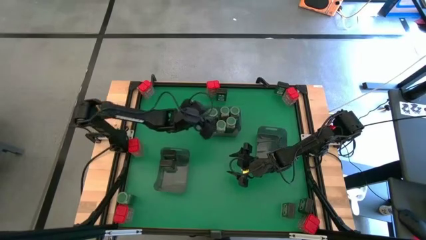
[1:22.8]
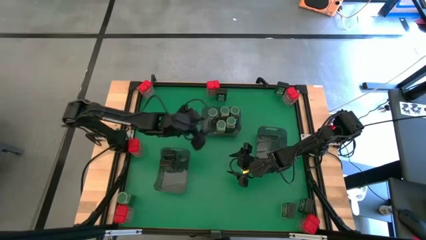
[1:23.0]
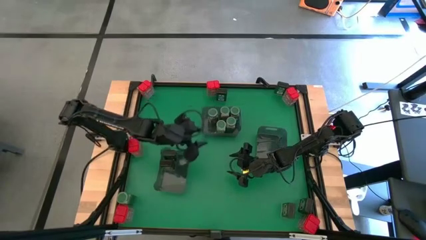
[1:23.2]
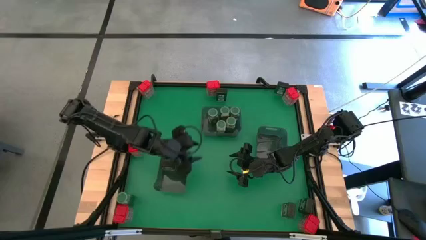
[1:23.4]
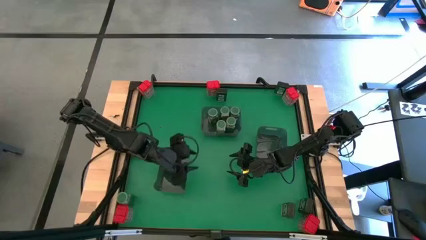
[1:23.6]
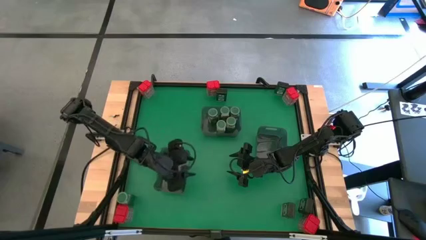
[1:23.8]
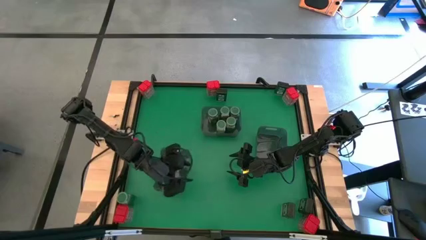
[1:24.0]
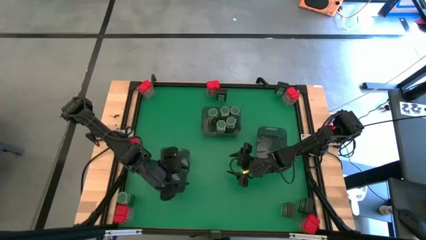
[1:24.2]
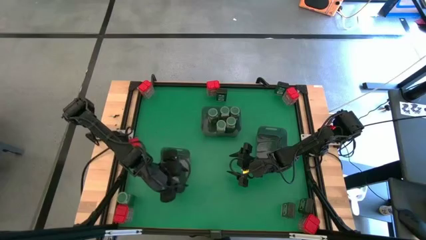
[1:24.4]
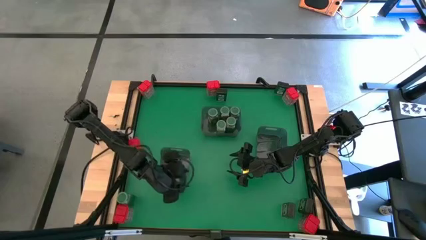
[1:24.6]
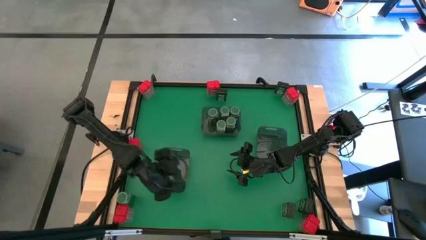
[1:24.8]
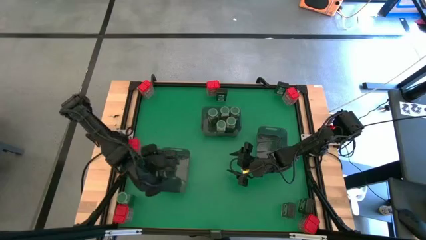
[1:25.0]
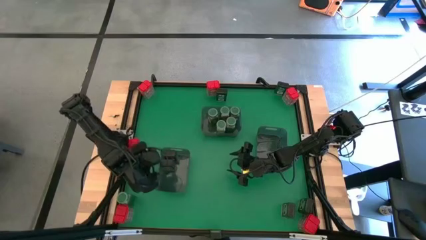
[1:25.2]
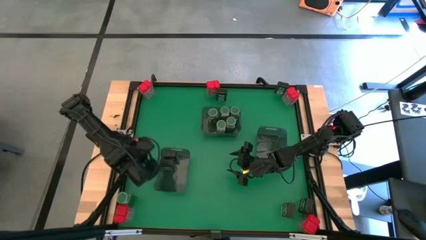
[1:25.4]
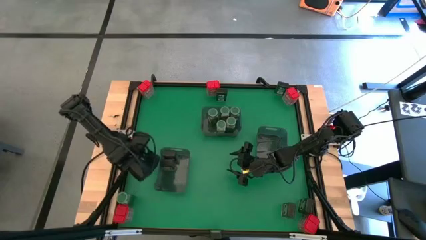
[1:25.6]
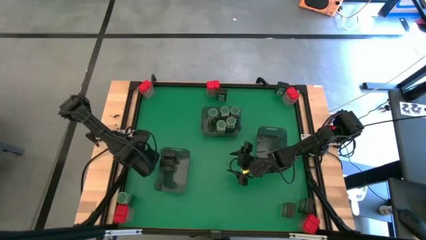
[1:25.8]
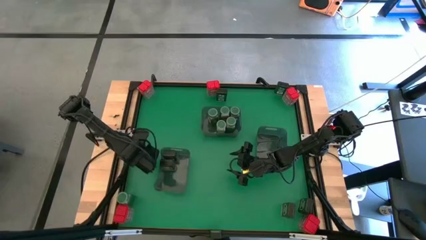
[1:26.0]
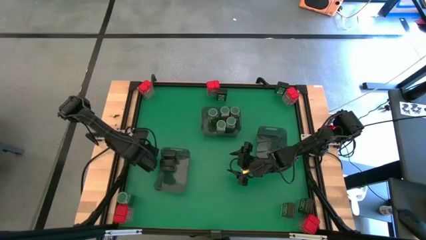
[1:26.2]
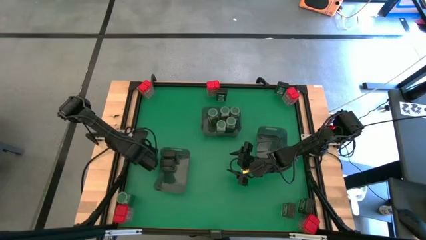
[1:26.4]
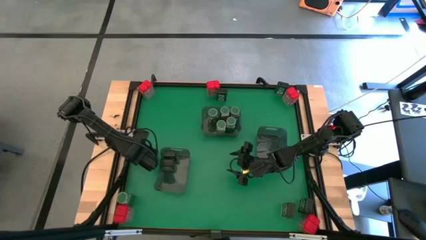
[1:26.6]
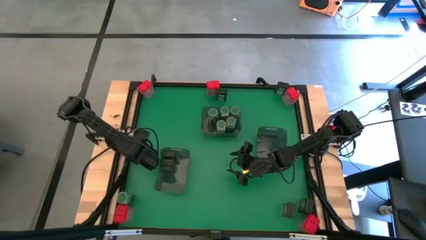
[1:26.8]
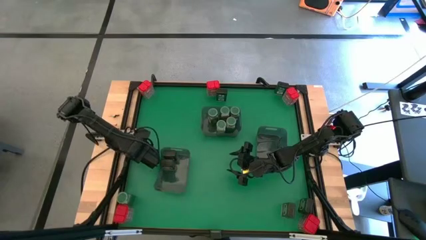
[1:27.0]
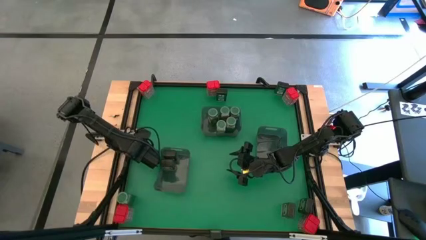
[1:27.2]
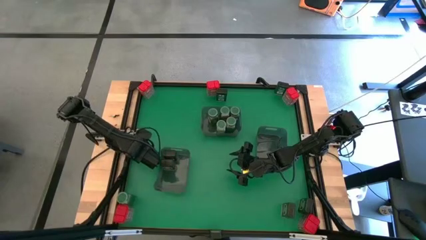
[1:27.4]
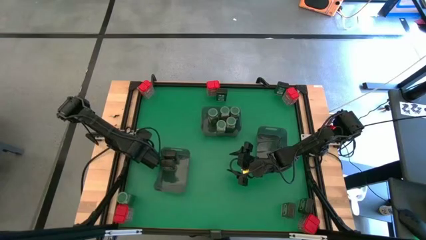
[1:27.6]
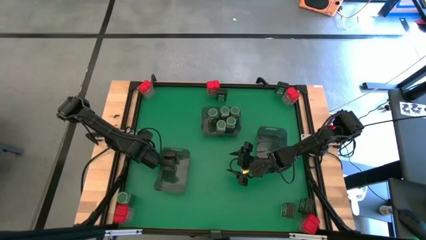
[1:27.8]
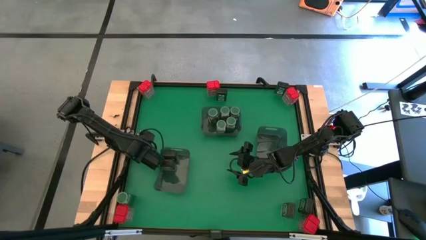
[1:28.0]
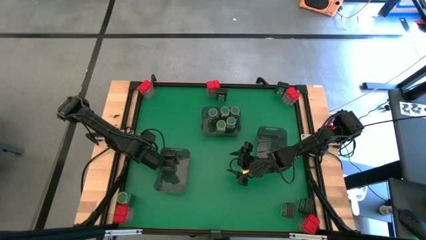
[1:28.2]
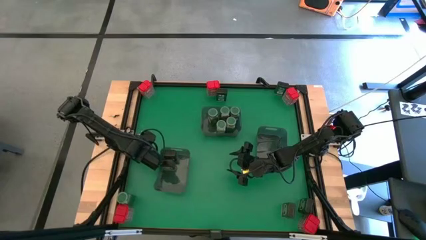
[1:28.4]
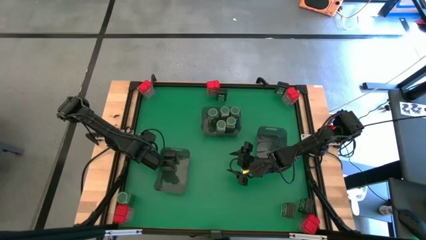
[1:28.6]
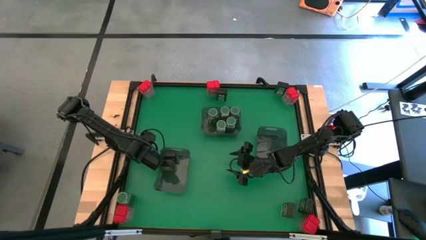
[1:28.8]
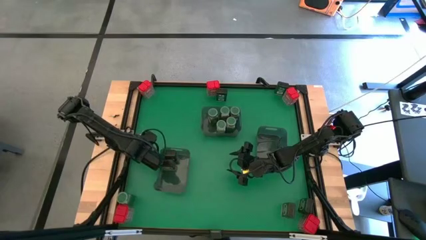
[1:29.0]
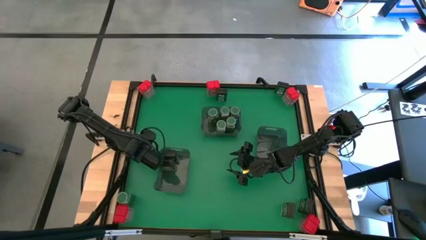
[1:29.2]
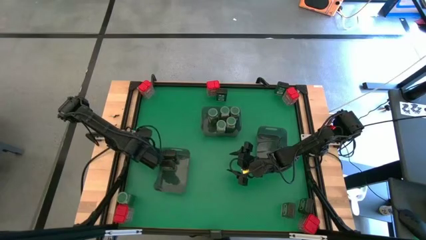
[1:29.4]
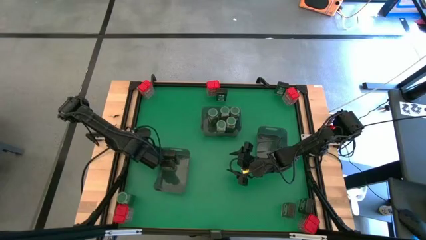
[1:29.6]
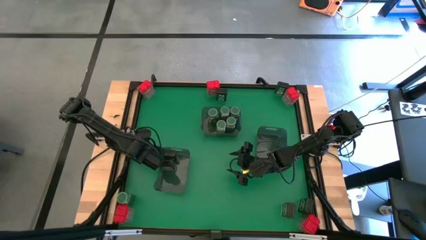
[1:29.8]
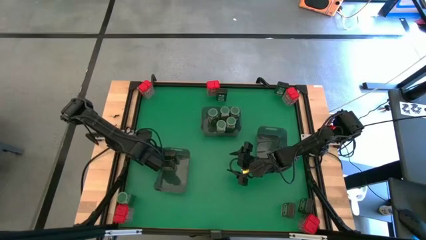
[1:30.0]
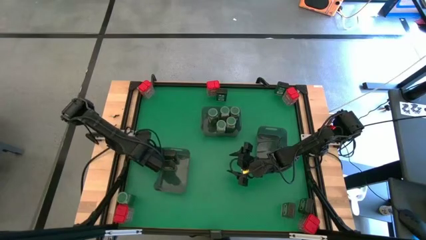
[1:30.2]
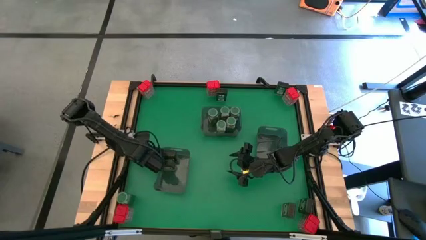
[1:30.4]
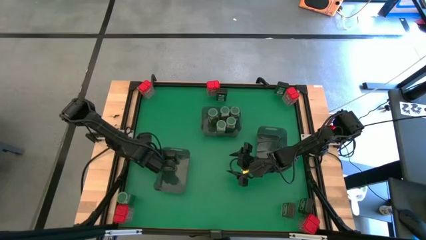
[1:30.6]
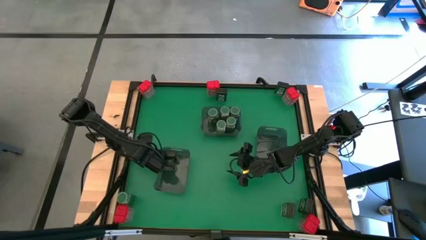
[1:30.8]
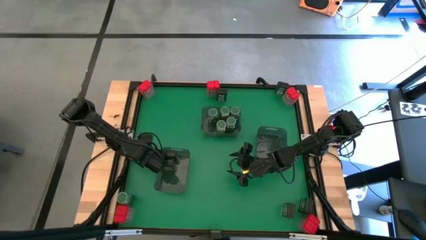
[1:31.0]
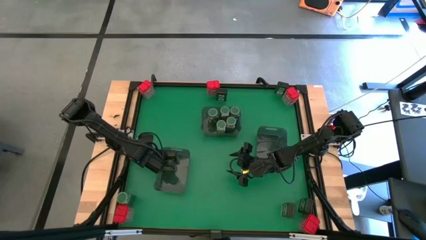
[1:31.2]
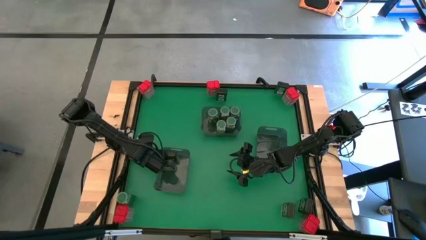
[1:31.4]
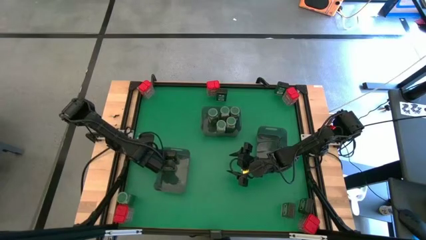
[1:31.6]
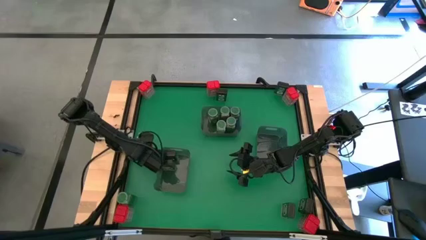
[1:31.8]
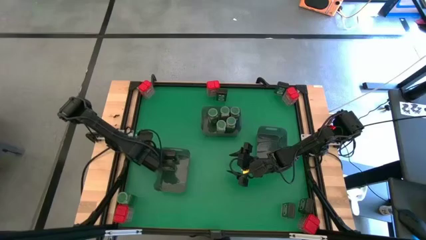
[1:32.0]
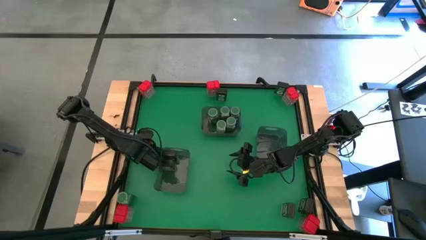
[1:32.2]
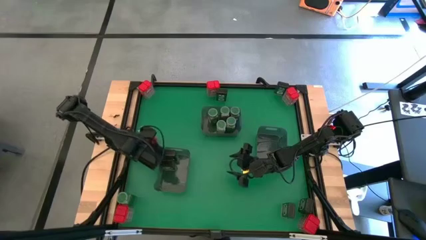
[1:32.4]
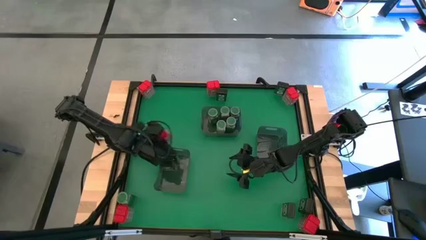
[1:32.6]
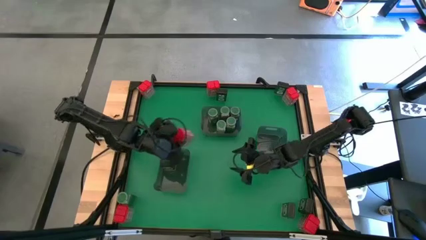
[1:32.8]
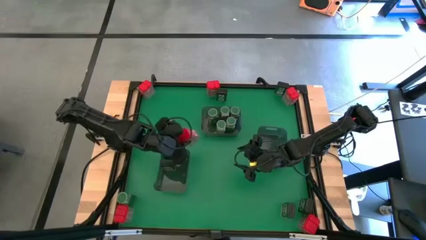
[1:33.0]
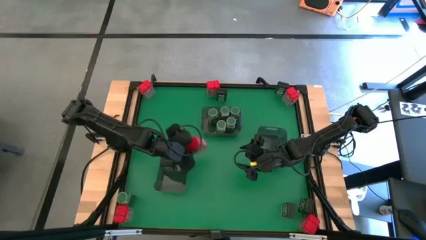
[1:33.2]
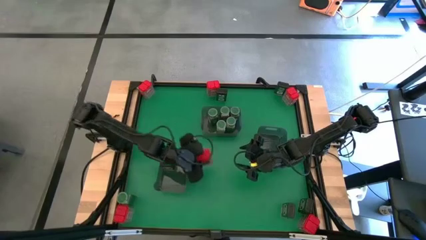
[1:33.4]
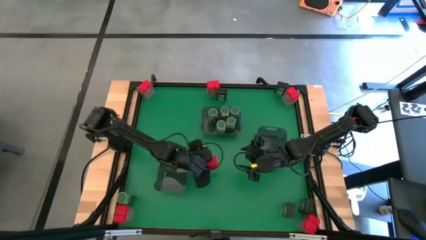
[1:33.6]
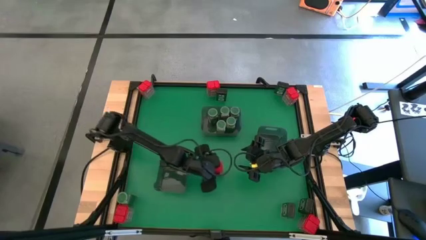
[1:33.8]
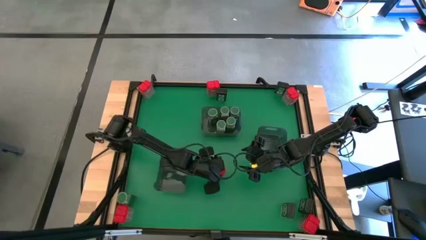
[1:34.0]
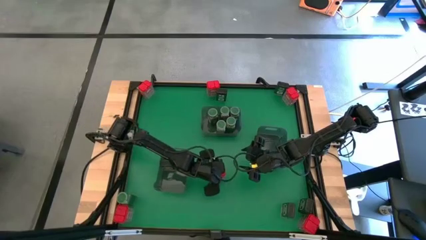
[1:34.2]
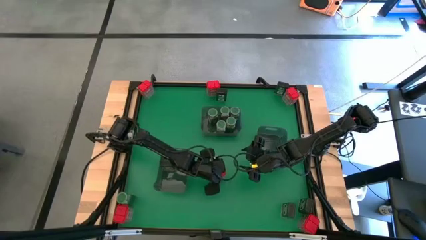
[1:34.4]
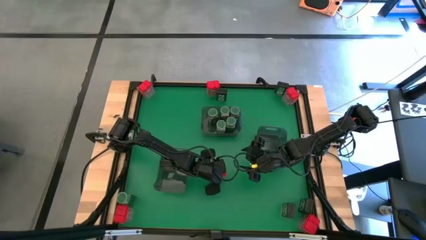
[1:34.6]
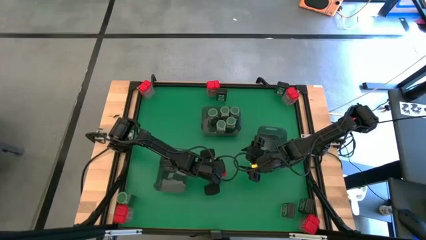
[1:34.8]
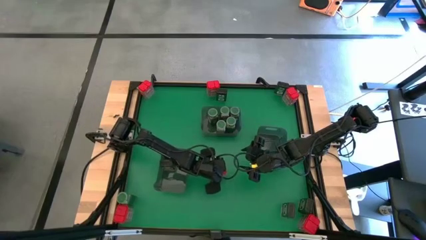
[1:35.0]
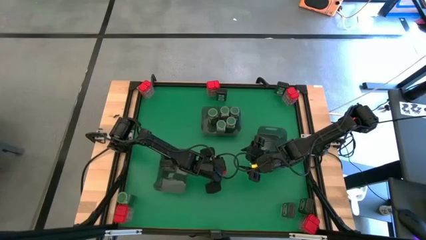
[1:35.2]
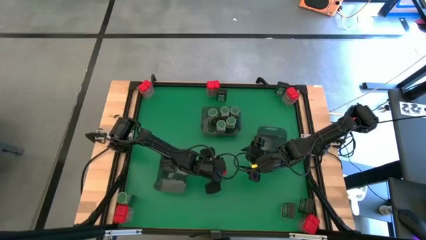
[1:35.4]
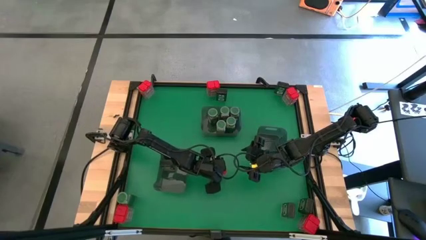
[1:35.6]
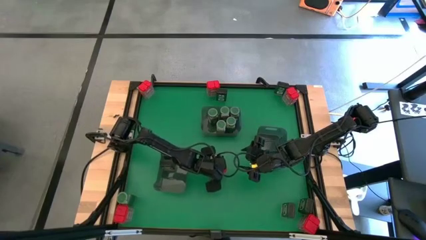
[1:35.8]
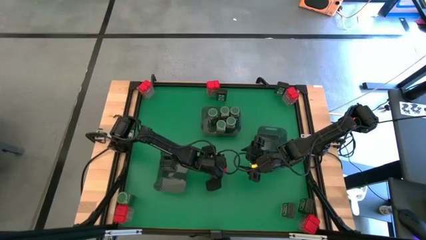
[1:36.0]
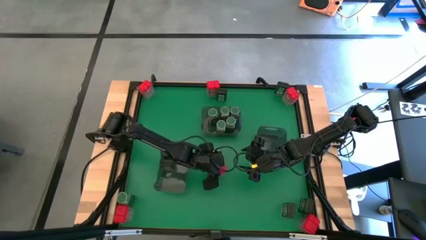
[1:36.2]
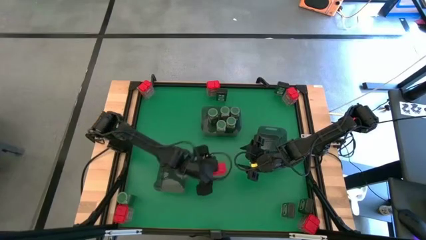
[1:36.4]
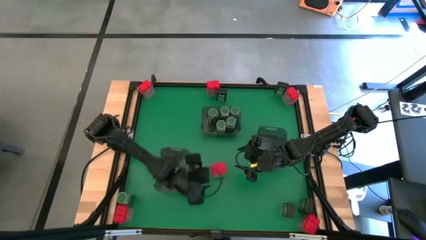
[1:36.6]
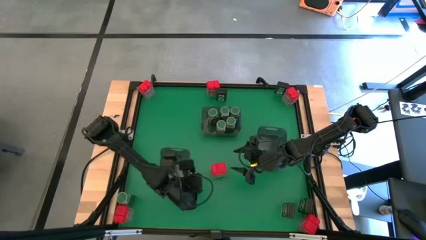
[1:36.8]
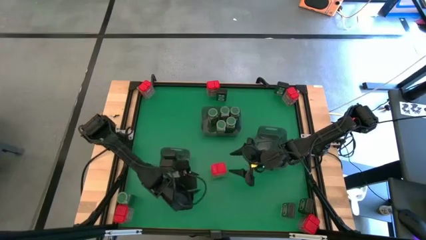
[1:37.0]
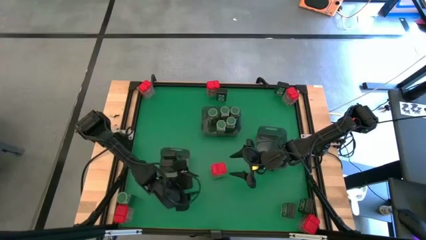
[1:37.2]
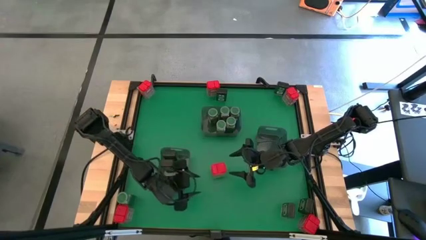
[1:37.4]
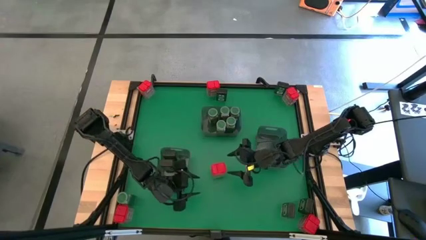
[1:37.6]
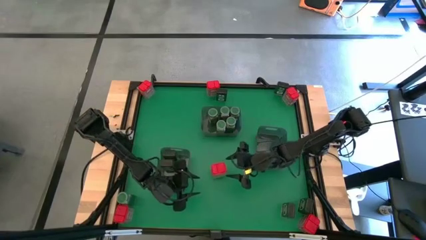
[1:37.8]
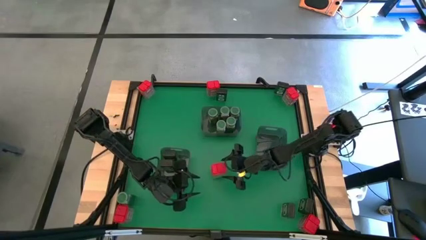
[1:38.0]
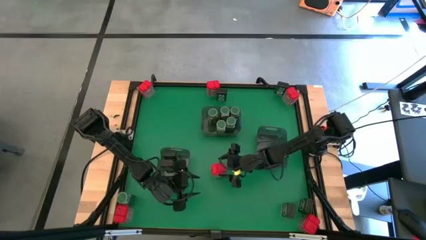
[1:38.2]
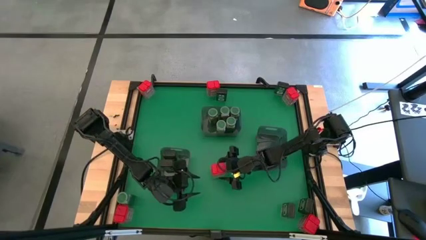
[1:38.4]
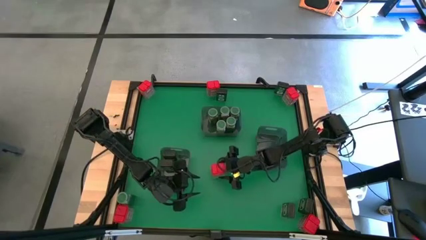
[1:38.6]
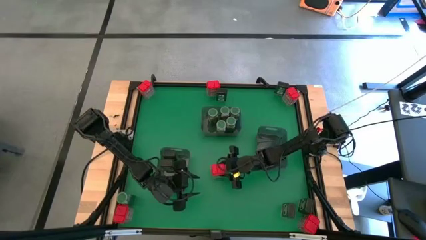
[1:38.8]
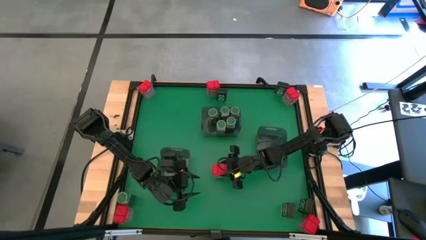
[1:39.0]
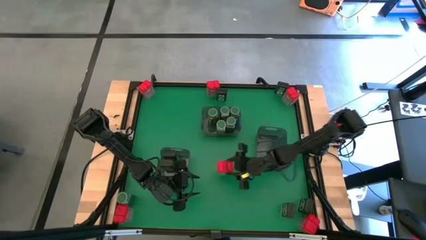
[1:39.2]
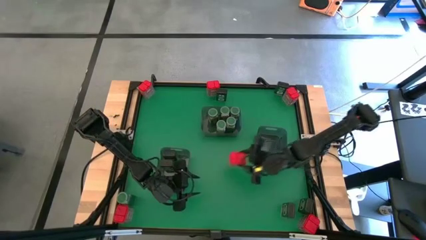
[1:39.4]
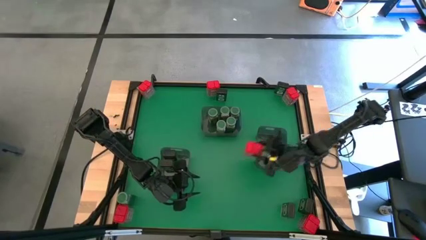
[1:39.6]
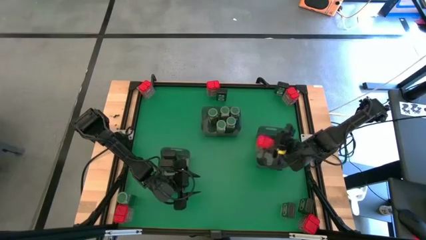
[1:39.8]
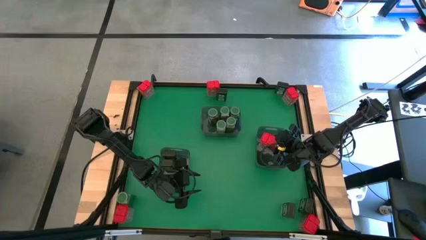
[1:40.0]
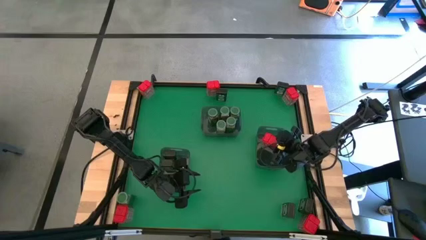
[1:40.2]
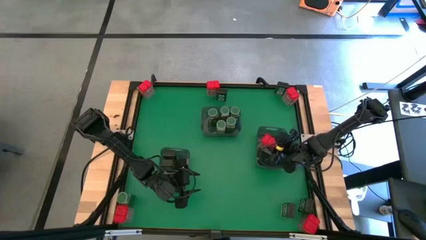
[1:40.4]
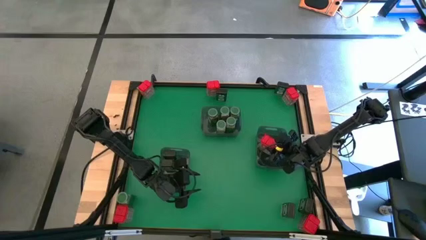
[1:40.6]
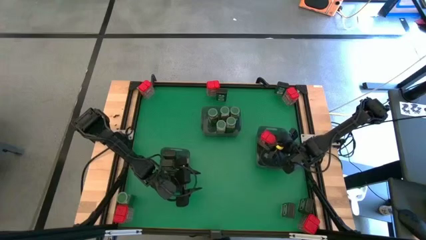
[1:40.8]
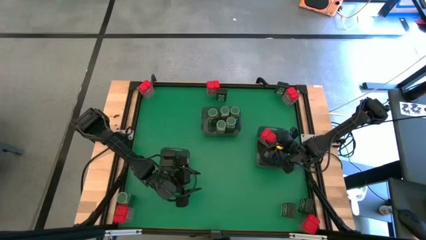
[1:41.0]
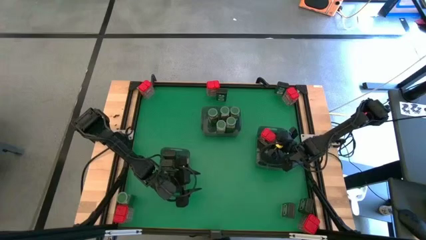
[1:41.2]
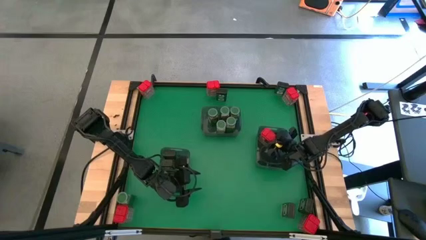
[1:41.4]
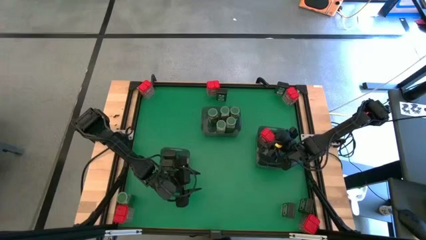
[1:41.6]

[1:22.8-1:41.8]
Task: Sort spices by type
Put the red seasoning can into the right black bin
